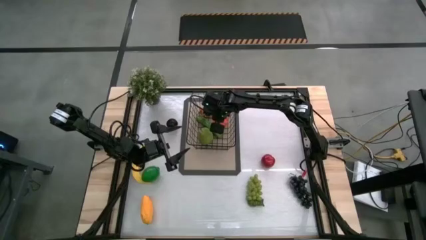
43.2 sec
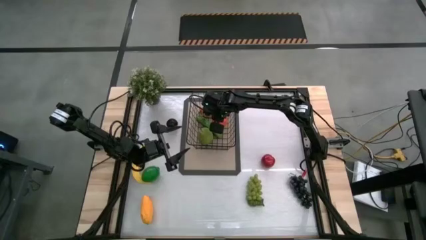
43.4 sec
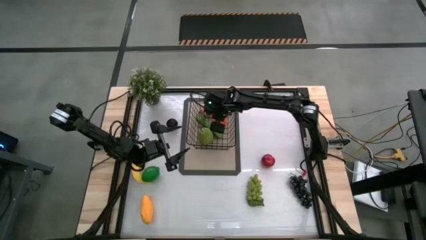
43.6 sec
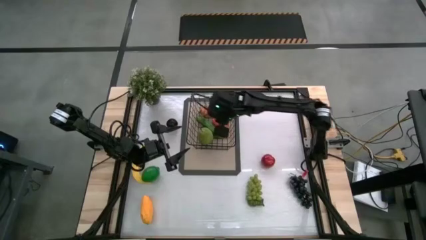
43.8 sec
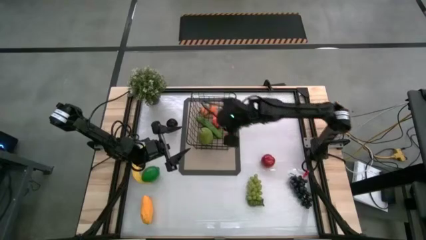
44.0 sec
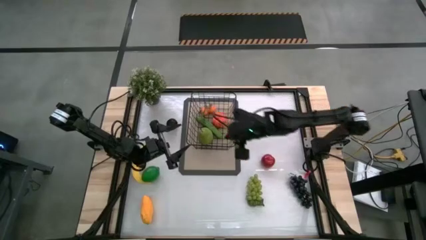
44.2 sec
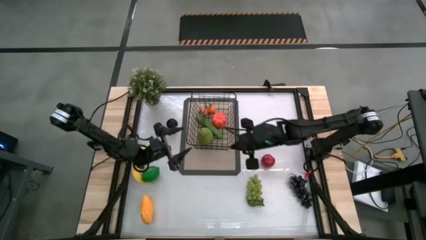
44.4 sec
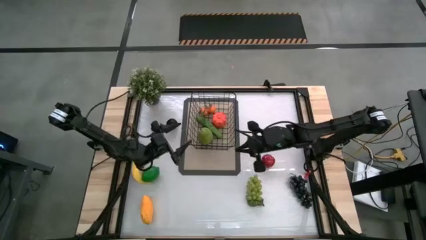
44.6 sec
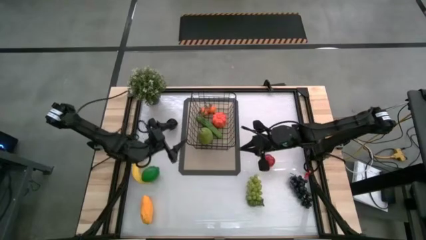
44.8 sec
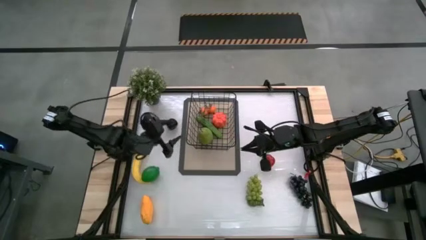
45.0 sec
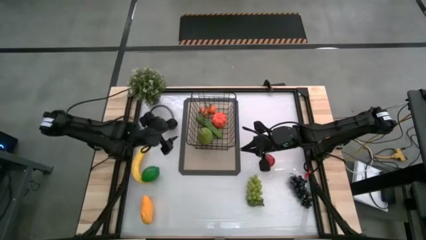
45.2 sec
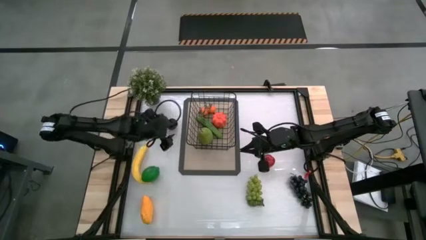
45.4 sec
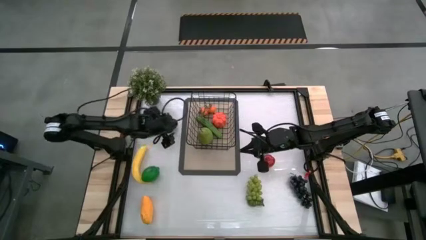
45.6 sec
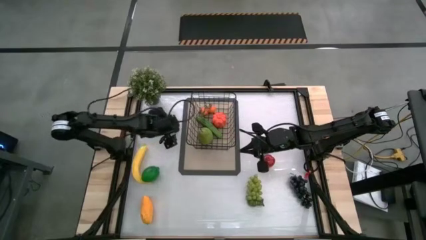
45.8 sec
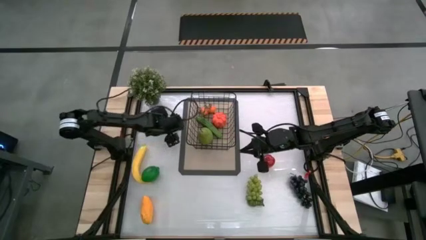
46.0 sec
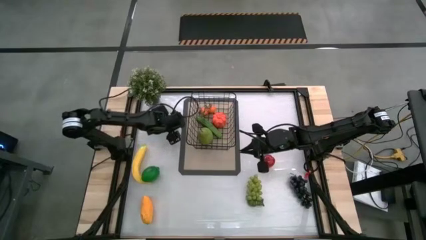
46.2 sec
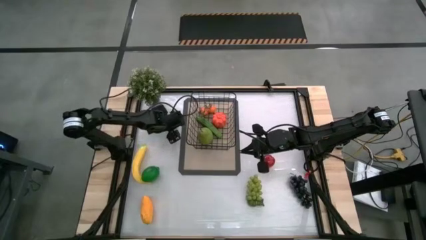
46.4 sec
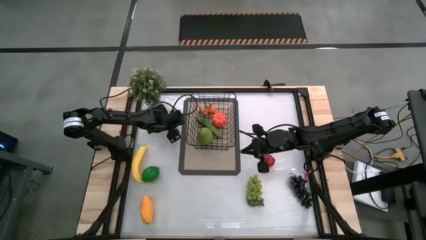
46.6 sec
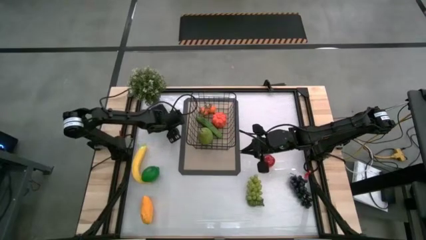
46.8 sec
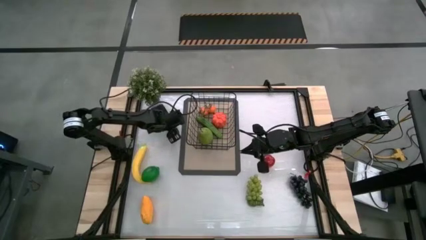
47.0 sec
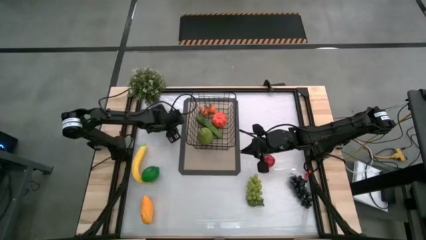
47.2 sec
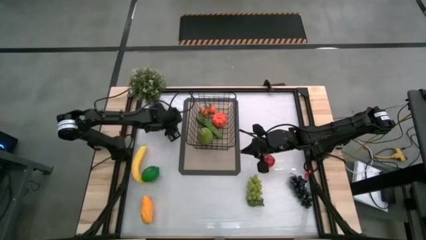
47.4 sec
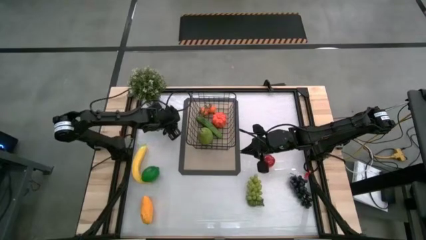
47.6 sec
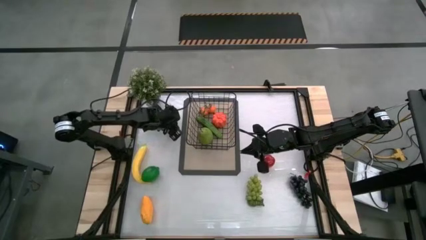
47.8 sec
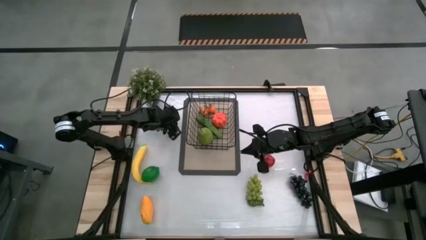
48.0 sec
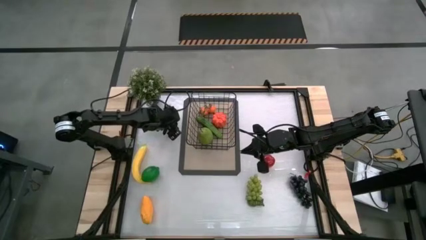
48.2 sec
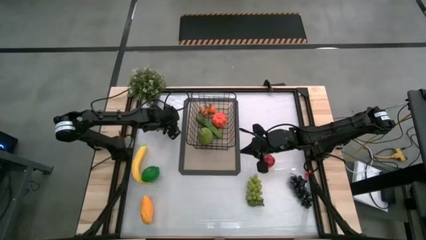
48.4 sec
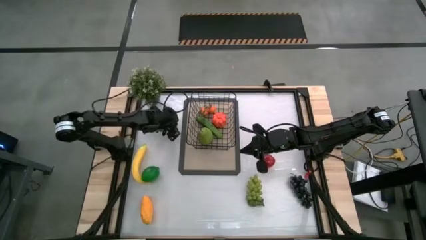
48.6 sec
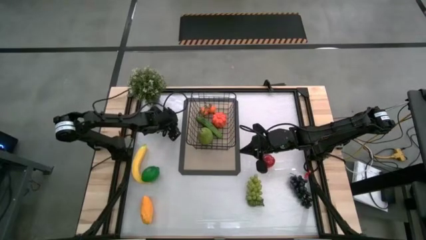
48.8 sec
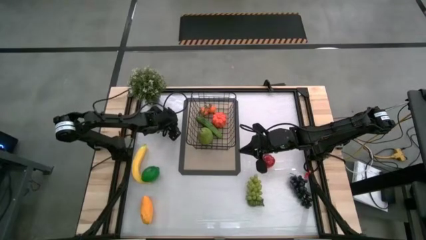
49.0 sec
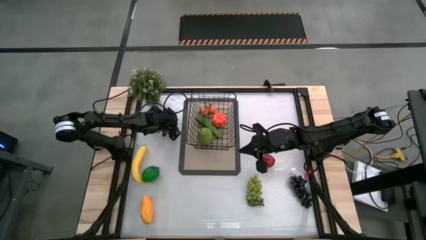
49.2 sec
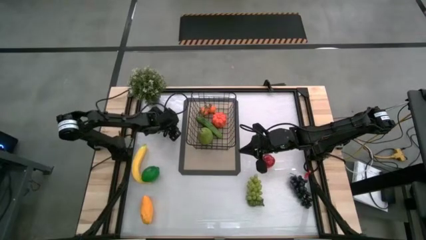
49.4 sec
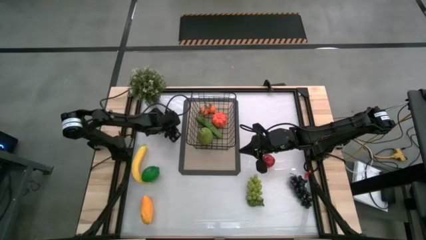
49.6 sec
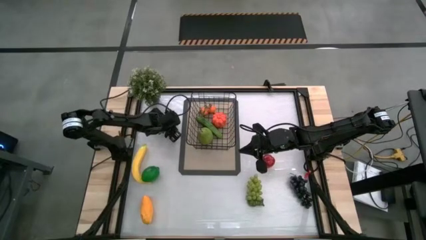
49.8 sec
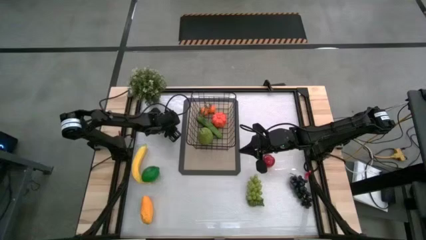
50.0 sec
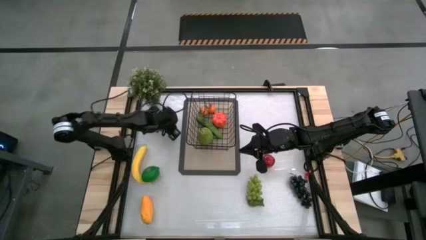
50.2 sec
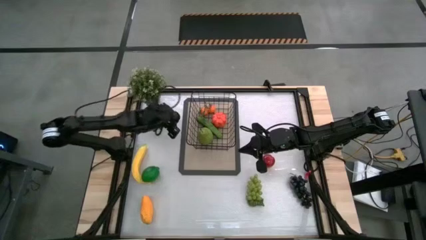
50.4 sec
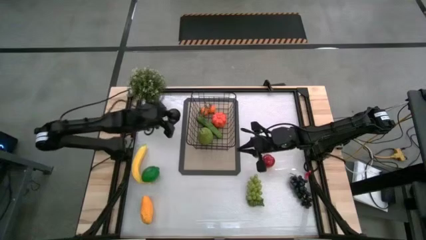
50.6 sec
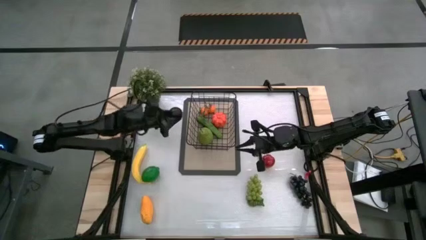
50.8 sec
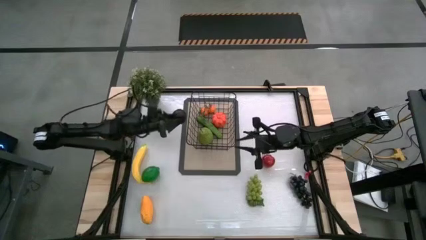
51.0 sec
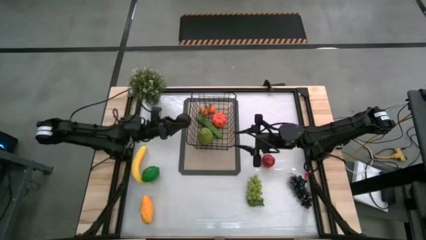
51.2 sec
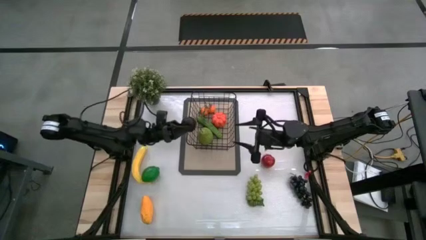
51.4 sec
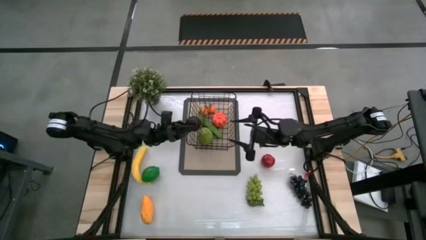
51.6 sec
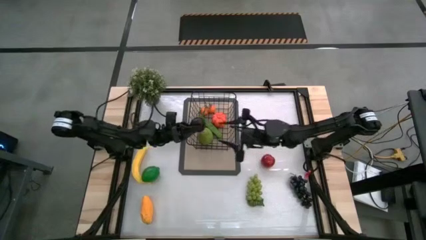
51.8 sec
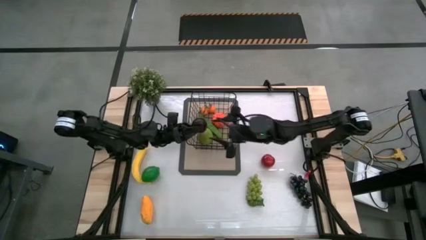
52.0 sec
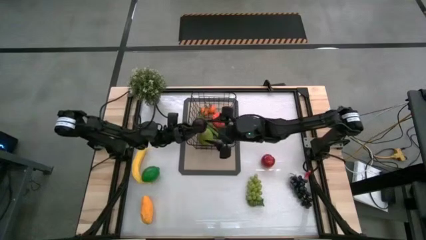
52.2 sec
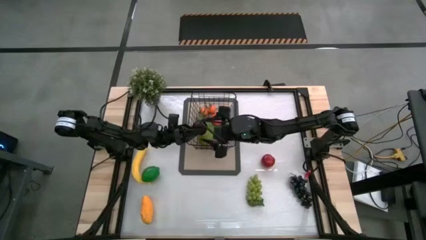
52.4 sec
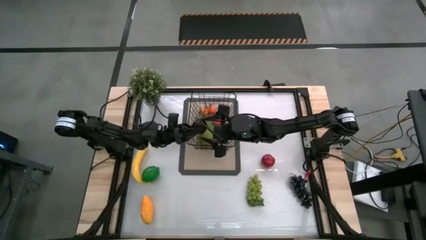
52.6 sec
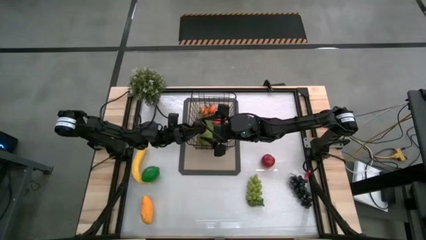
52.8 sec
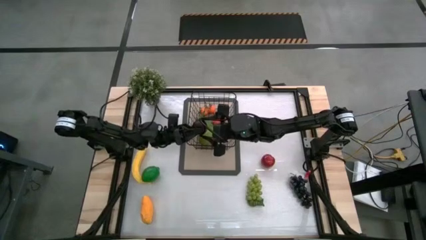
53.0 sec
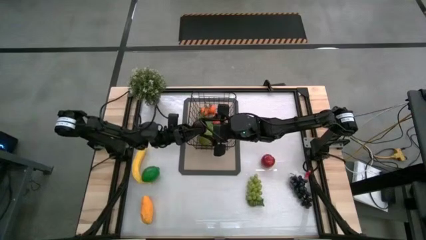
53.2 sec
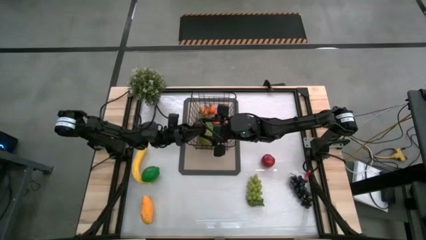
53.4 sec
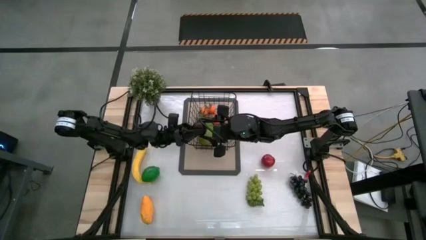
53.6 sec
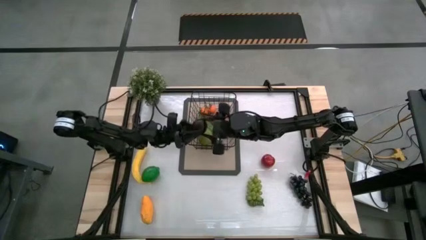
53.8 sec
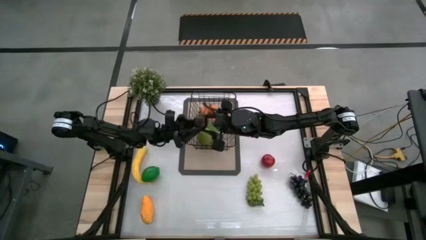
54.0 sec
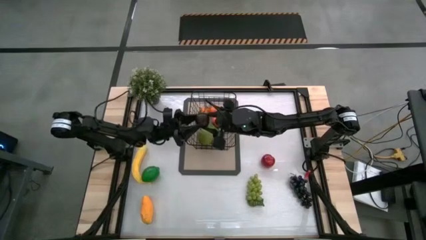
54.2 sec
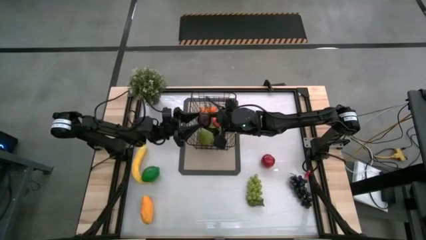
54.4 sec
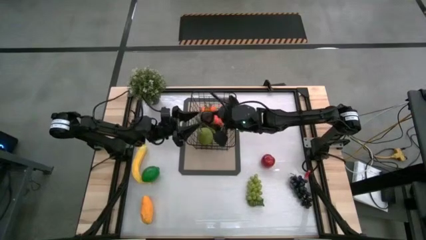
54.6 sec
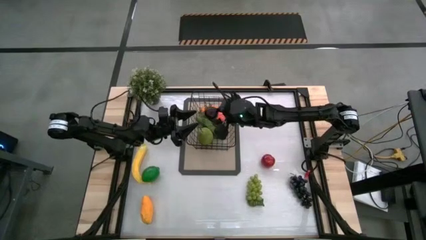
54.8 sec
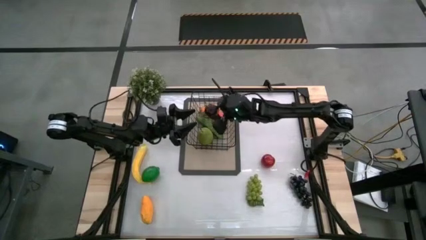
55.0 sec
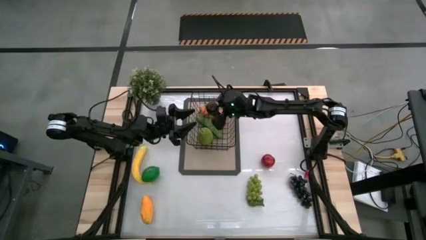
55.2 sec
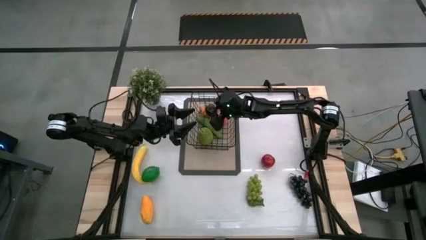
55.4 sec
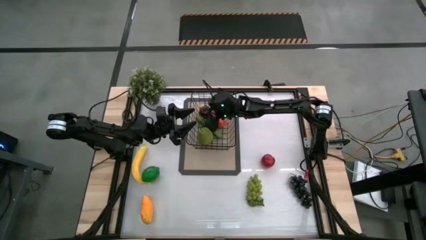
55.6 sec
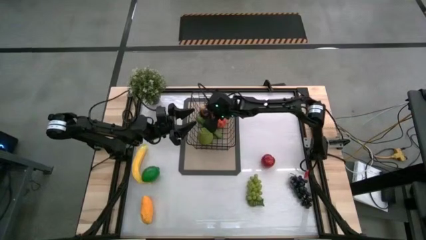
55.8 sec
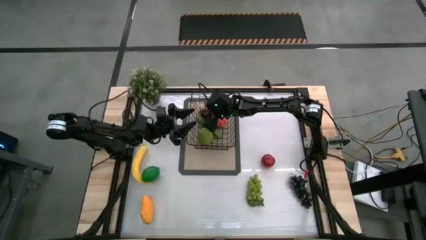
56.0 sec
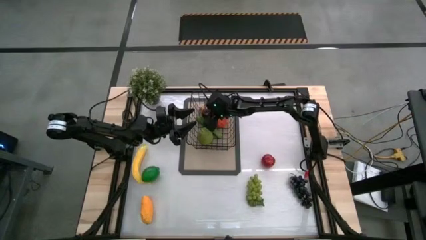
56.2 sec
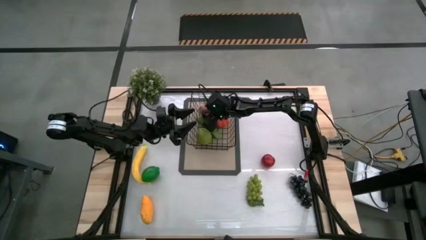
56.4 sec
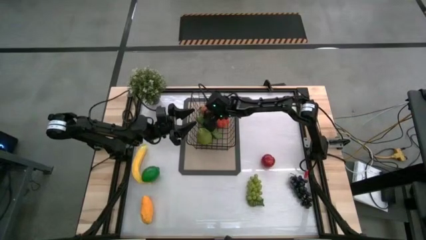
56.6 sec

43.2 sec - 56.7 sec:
Task: Build produce basket
Put the plum into the black wire basket
